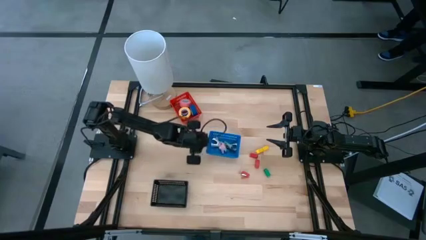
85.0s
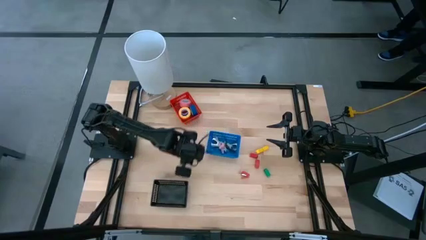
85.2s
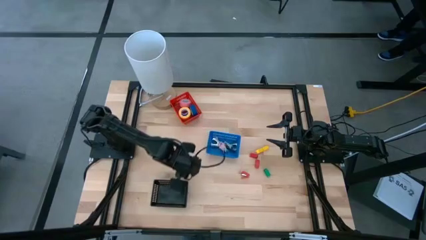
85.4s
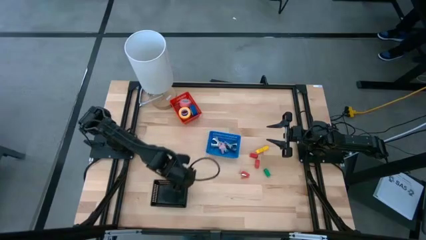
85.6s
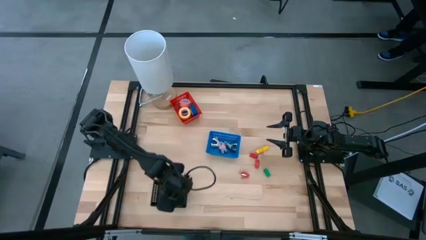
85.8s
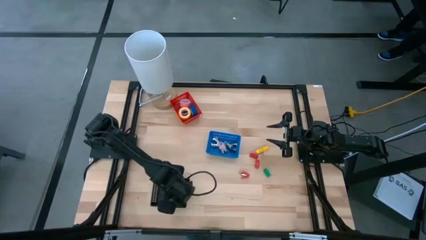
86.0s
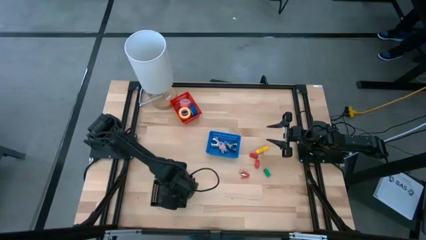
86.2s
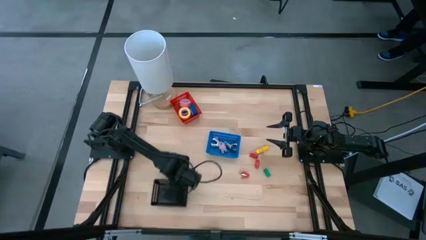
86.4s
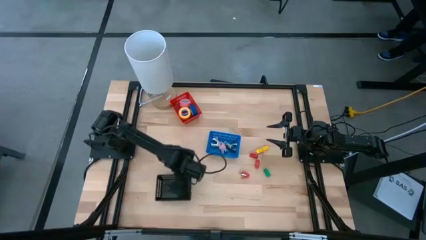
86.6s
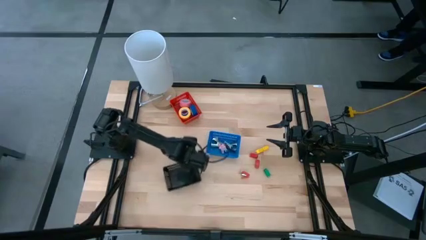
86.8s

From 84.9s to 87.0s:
Task: Pick and place Stapler, Stapler remover, tape
Move the black basket to the bottom left of the blue basket

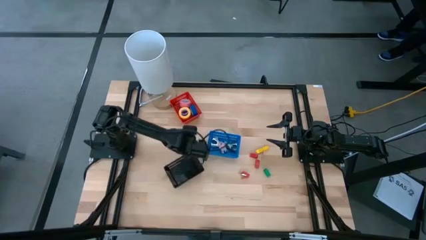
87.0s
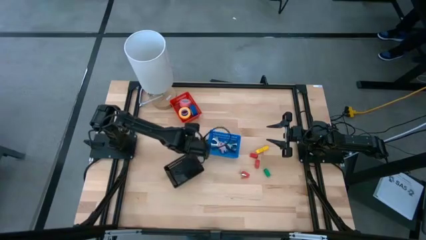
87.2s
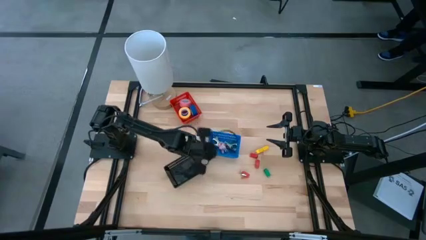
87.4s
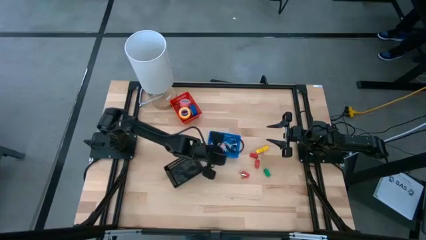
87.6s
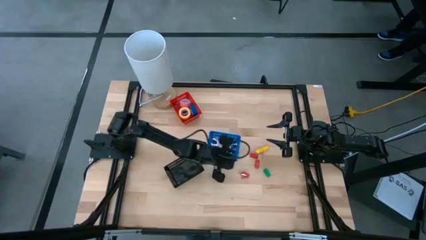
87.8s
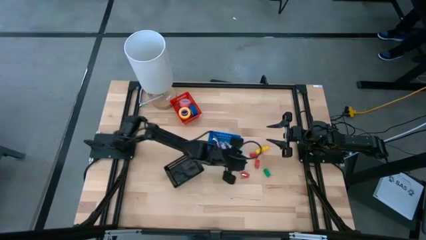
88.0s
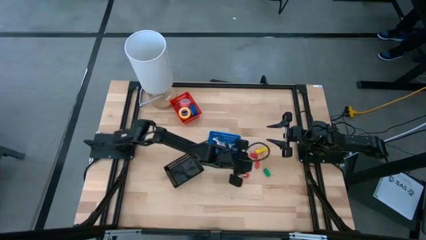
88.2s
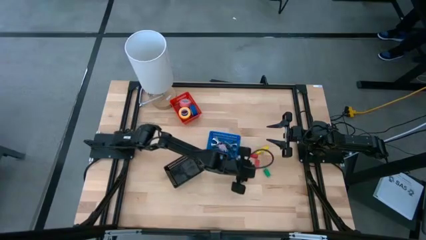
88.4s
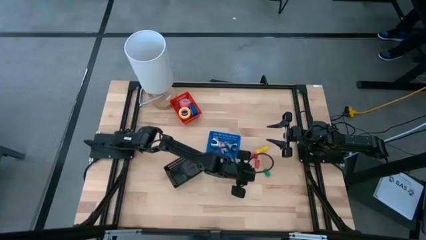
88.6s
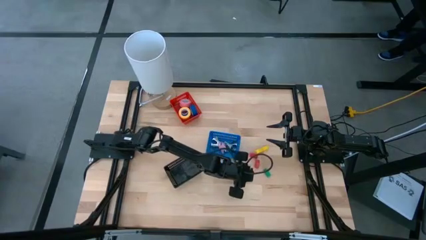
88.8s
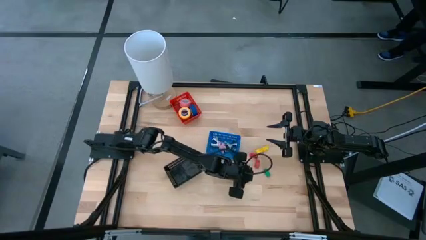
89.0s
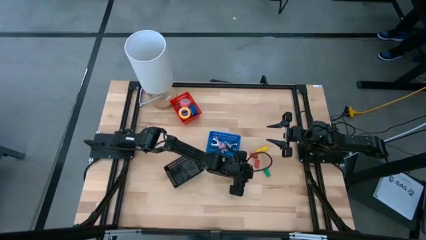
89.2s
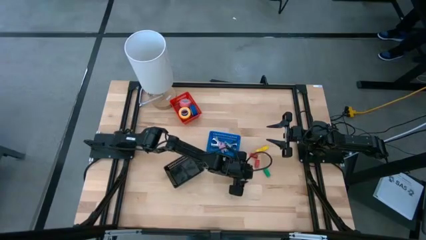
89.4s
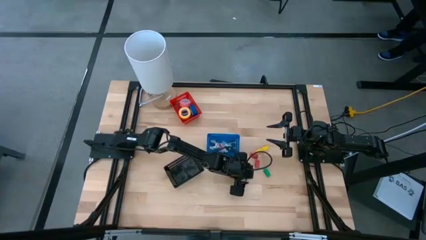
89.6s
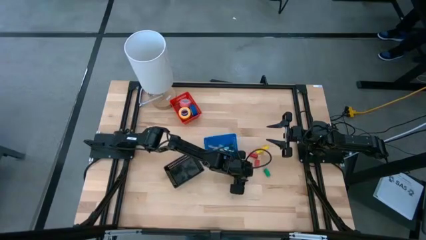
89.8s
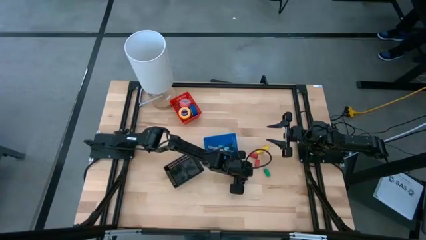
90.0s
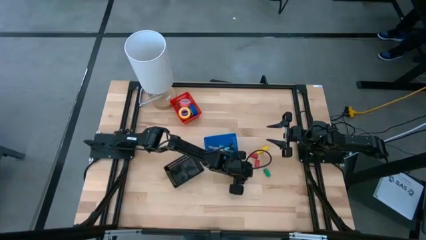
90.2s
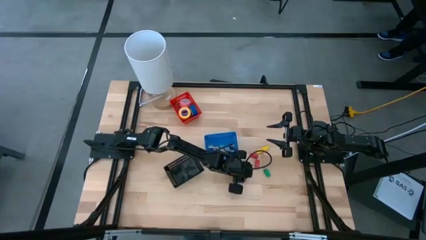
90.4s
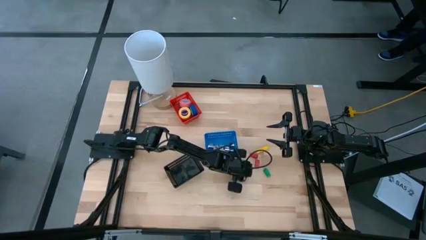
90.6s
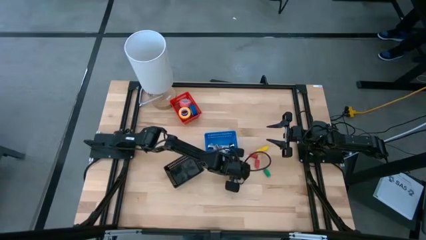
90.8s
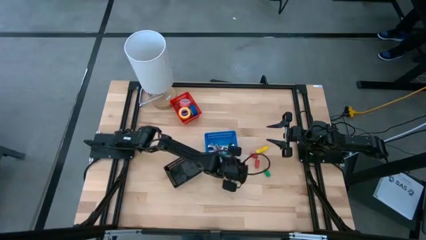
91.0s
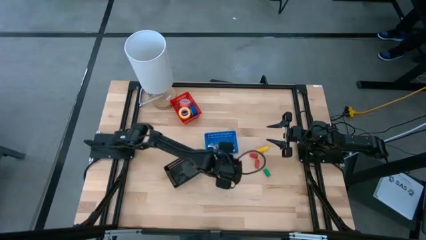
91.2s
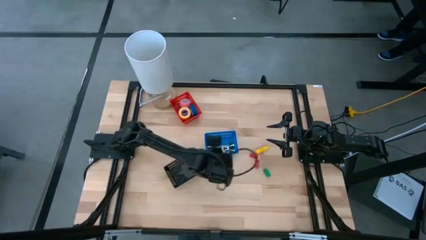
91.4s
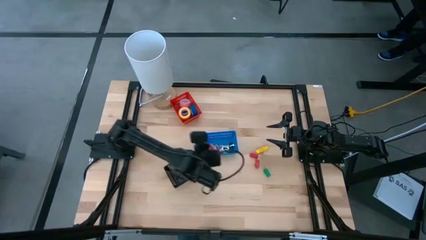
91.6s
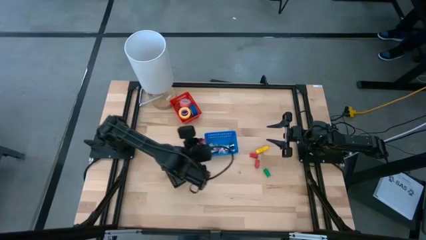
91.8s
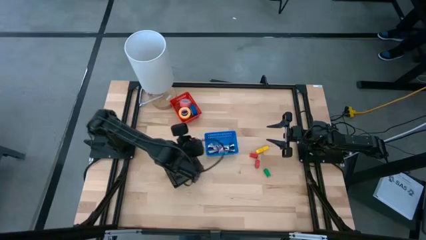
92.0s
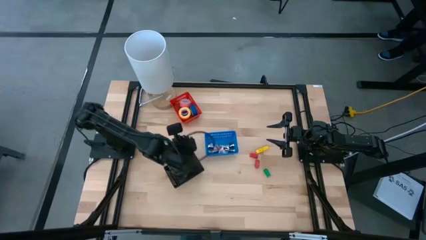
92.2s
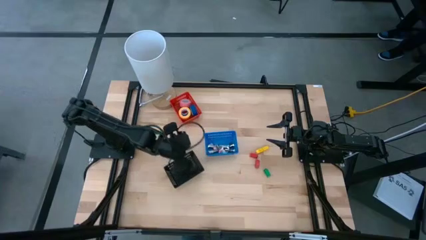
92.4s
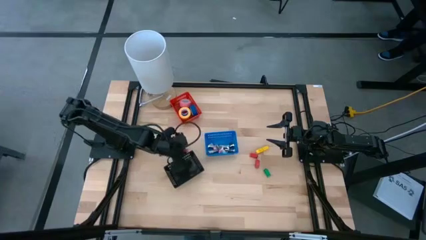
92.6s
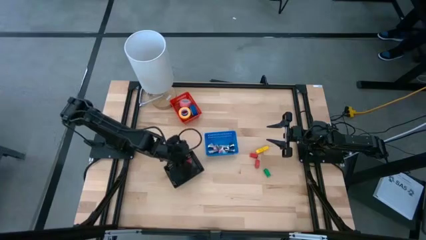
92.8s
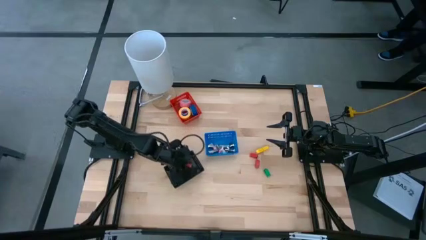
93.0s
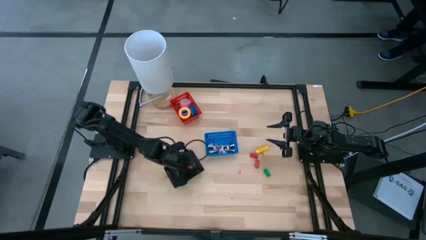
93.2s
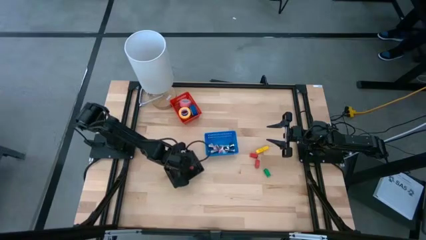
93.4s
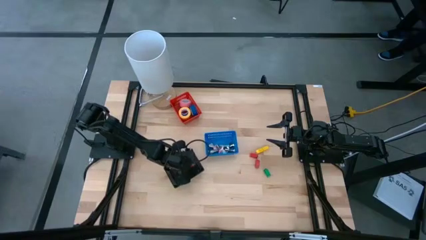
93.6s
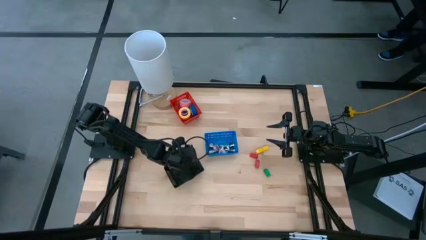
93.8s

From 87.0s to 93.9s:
Put the bottom red stapler into the black basket

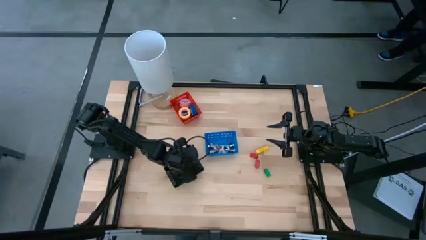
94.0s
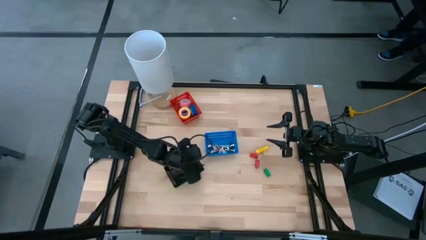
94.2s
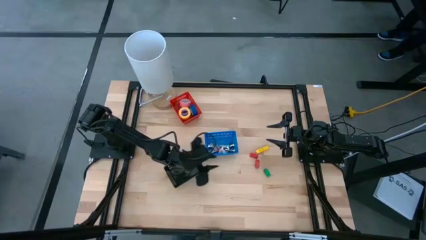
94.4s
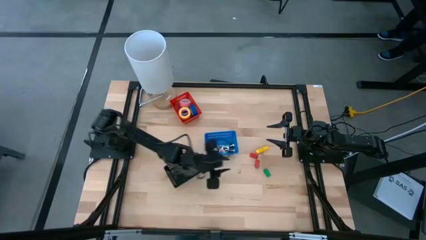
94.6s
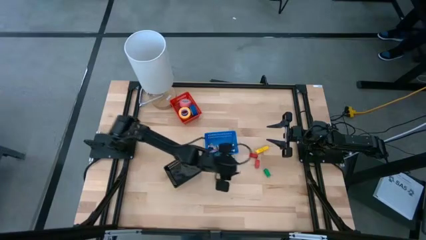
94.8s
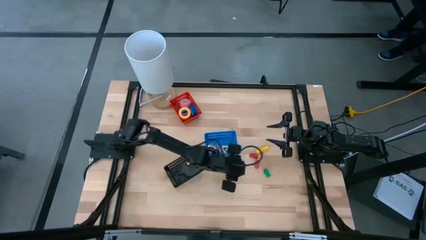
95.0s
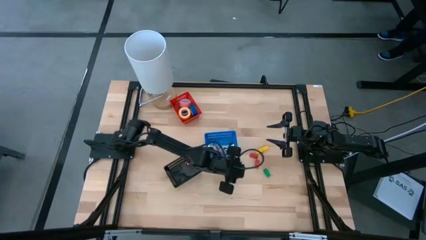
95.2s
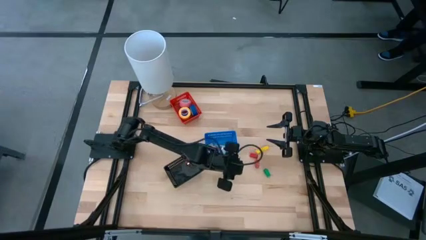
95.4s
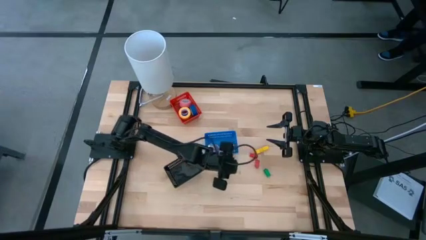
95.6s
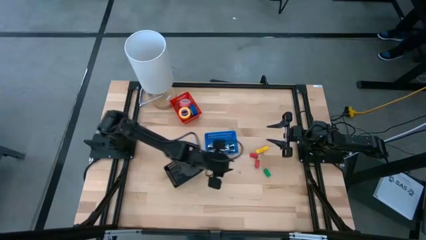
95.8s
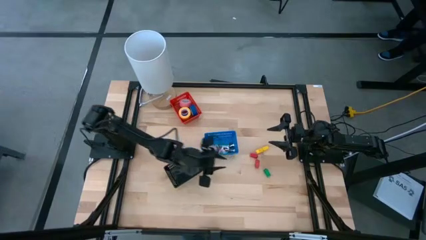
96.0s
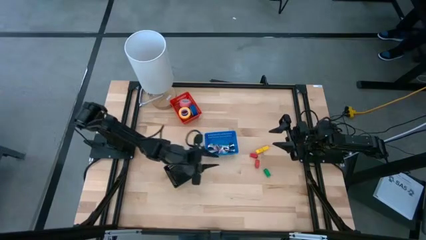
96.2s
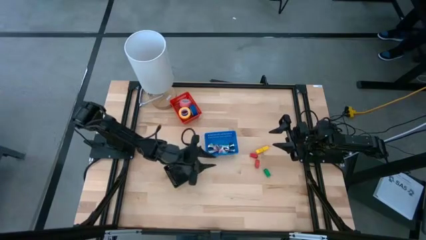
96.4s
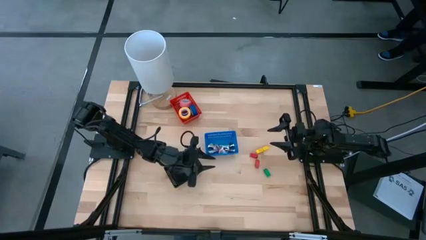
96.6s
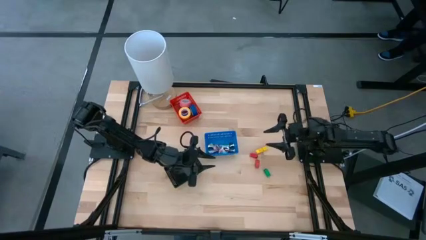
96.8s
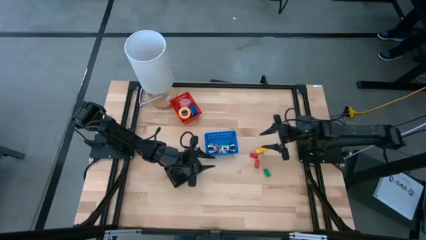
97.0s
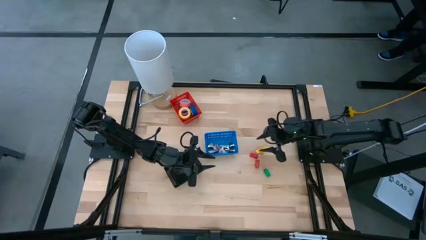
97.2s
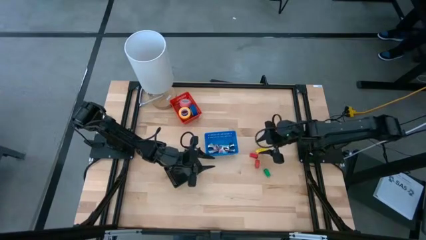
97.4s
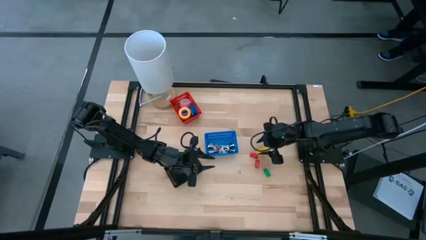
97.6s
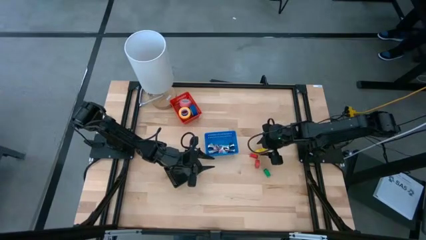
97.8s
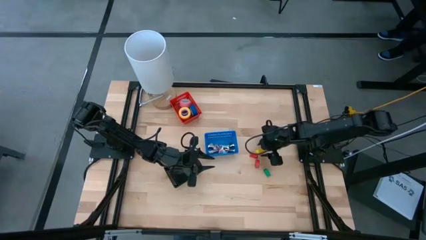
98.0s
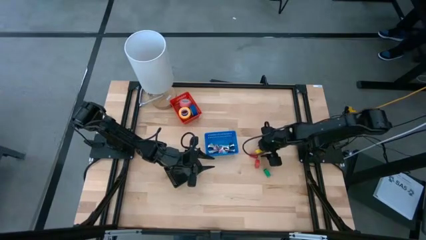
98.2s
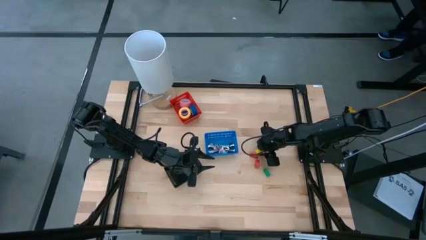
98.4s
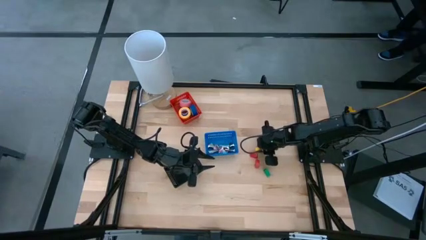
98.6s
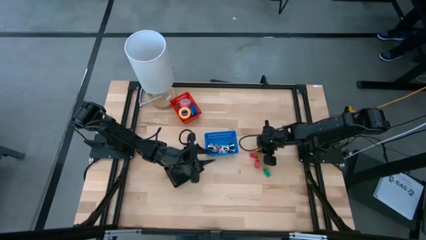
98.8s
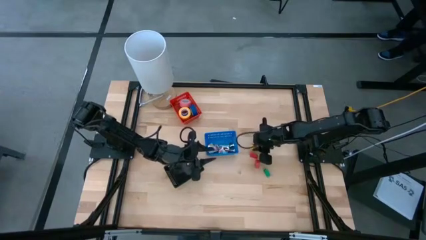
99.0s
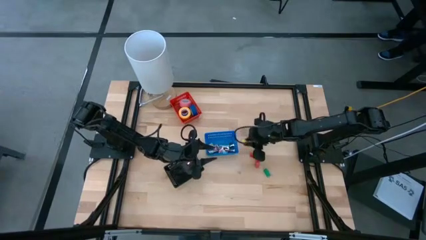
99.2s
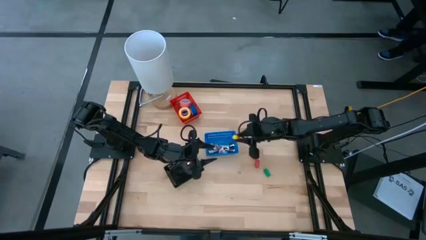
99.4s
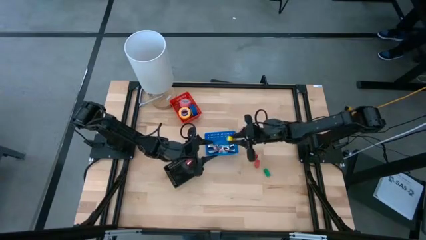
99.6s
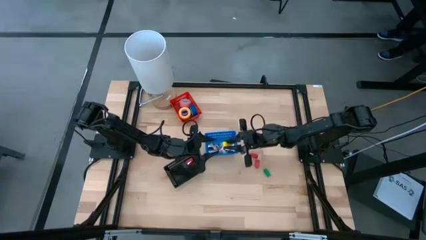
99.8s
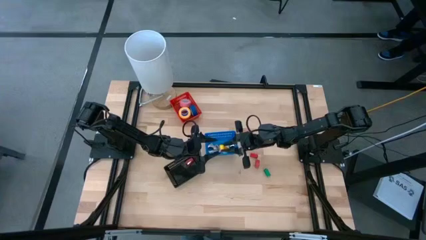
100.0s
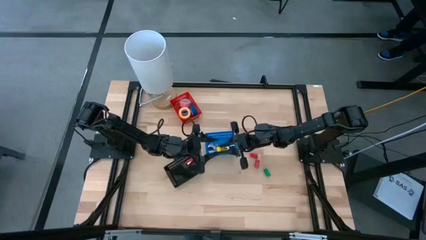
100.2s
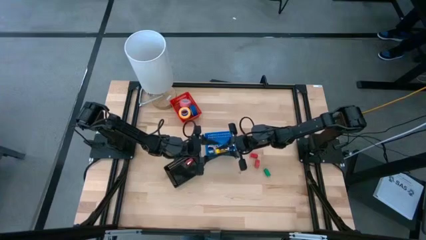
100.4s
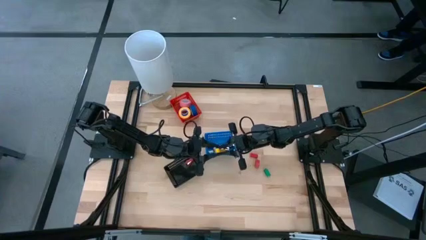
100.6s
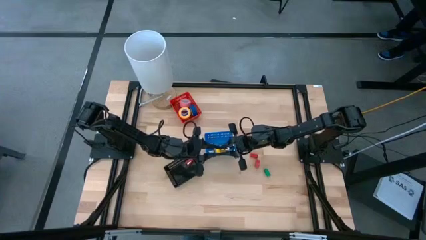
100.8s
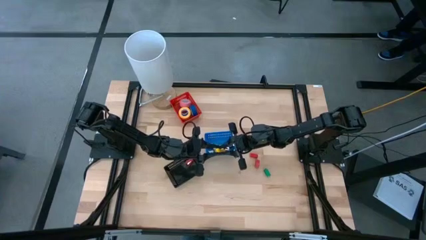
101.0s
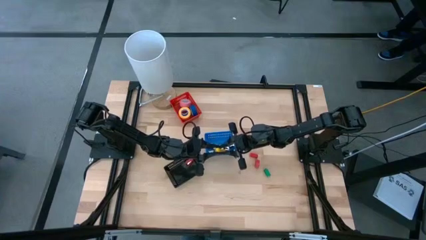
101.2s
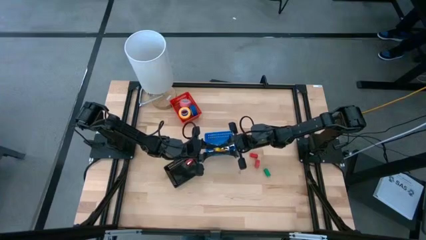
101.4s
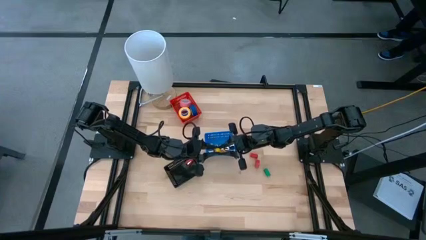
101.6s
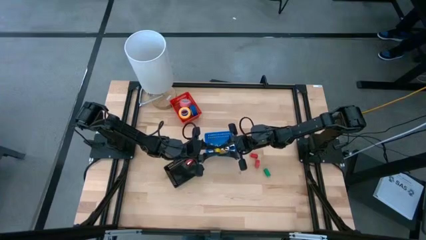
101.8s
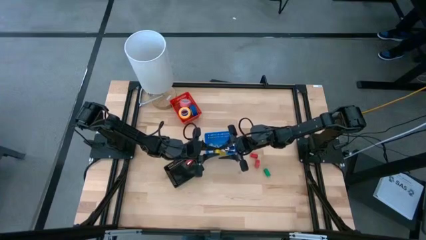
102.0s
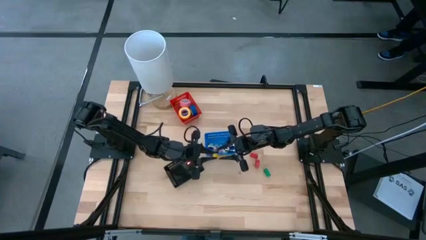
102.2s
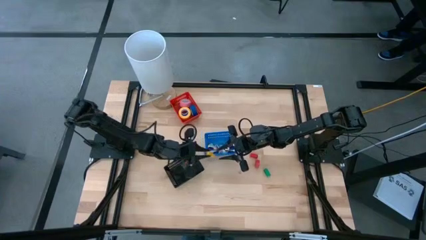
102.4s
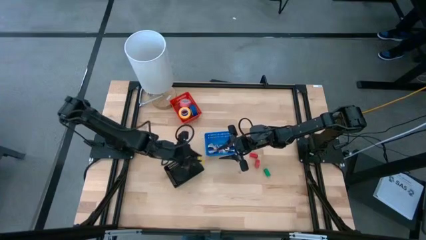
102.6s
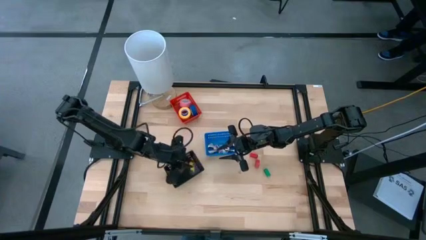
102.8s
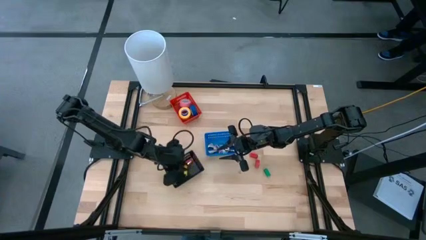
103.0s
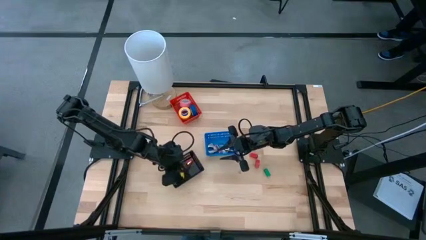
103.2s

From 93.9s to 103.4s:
Put the yellow stapler into the black basket
